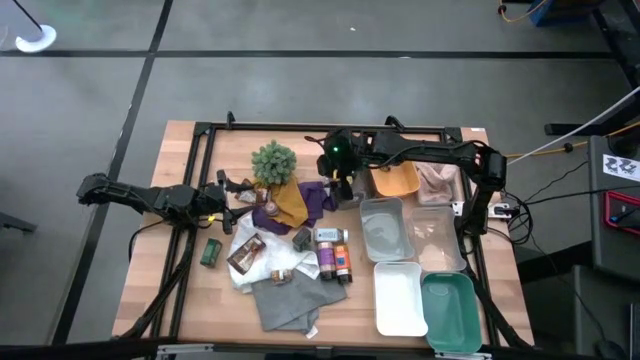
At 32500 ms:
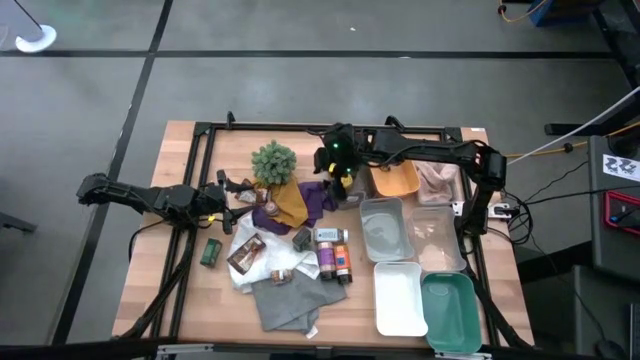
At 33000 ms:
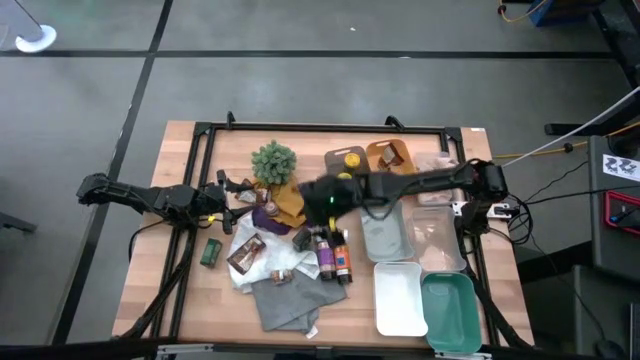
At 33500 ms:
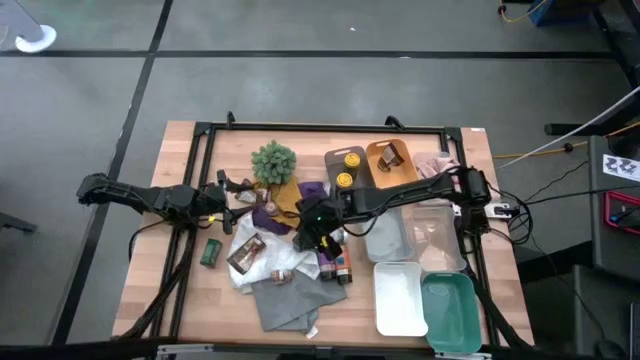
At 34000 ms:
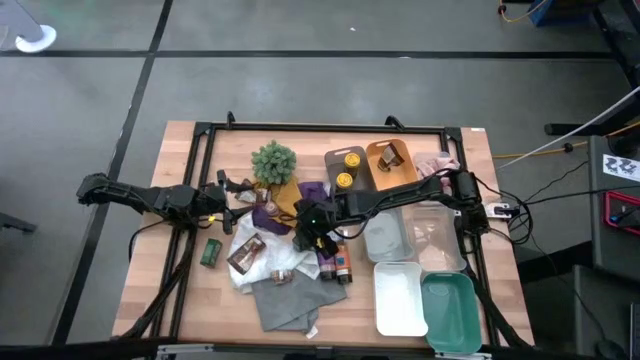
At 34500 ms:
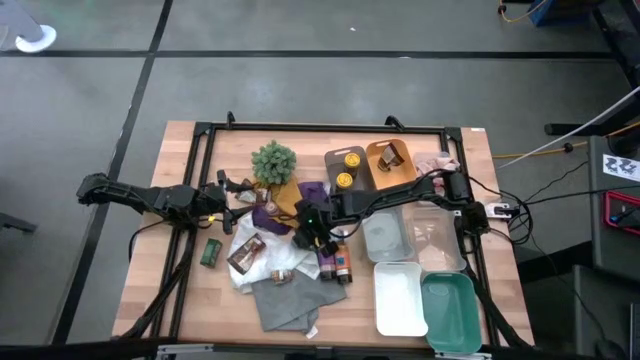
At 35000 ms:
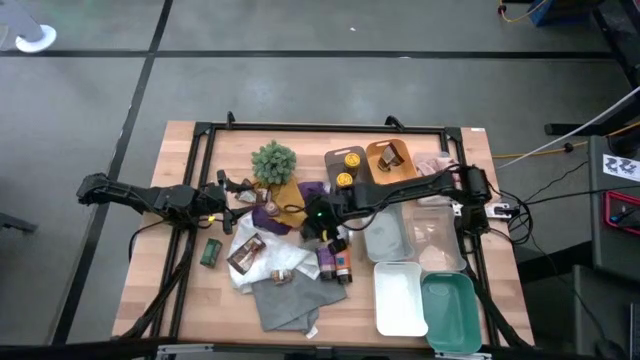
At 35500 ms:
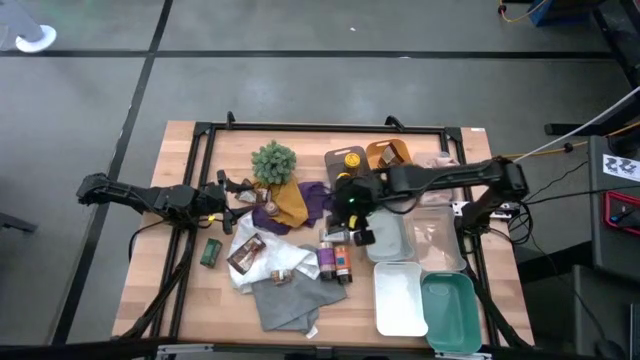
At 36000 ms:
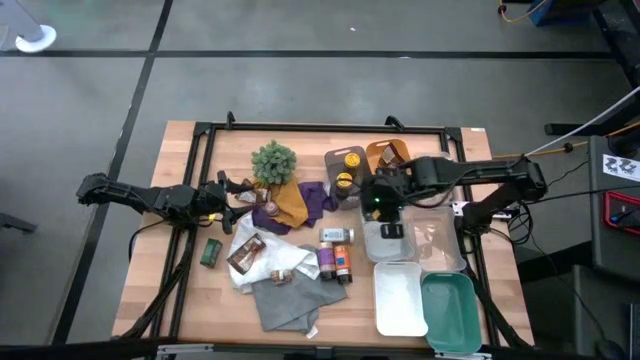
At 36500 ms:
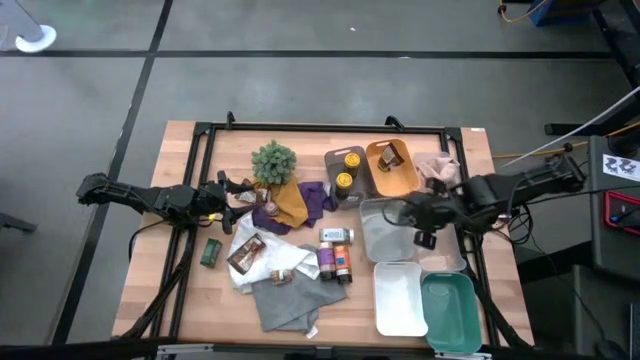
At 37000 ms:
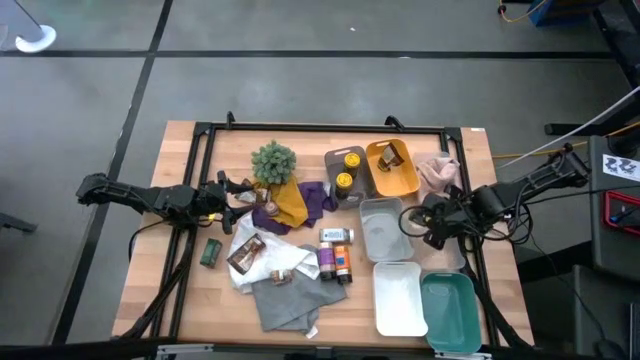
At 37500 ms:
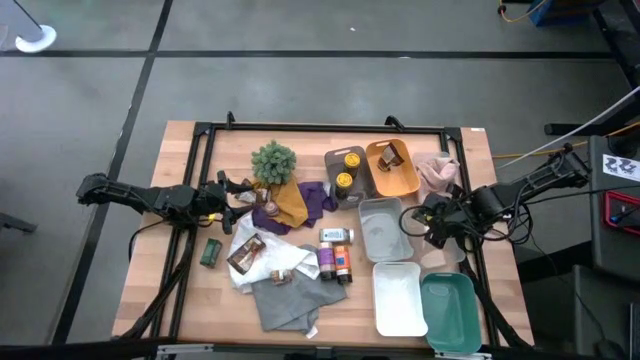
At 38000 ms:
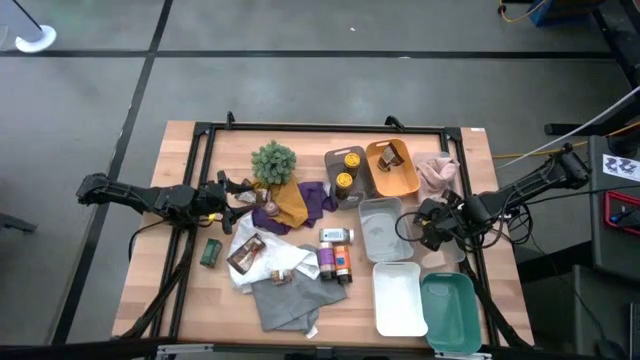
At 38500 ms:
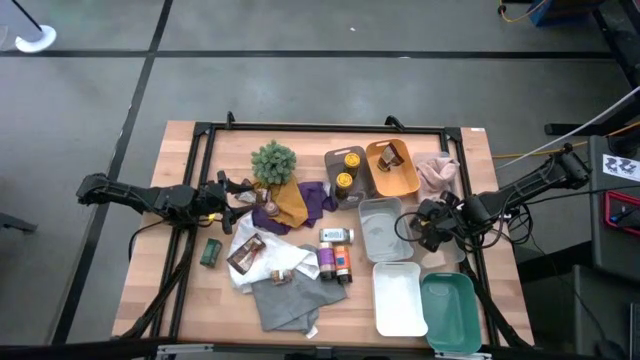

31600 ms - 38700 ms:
Task: Sort spices by type
Put the right black seasoning can into the transparent bin

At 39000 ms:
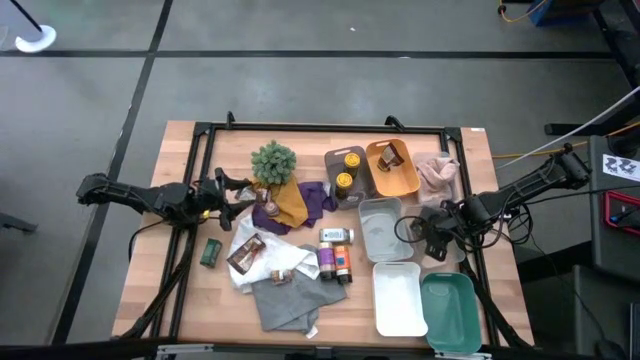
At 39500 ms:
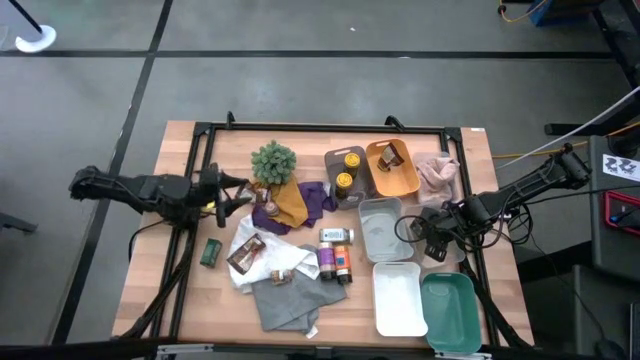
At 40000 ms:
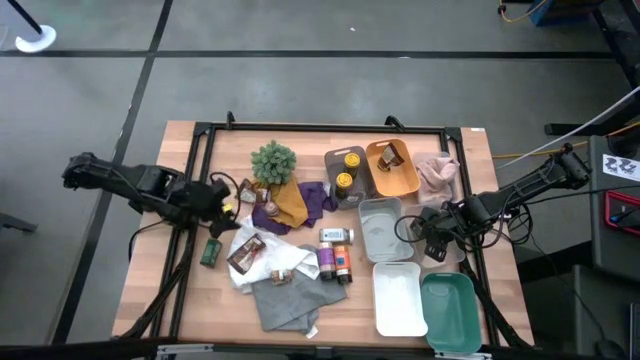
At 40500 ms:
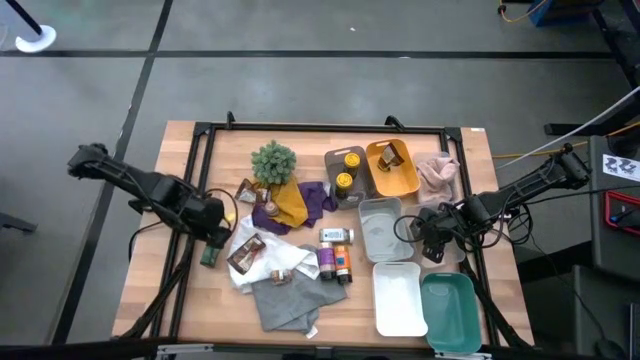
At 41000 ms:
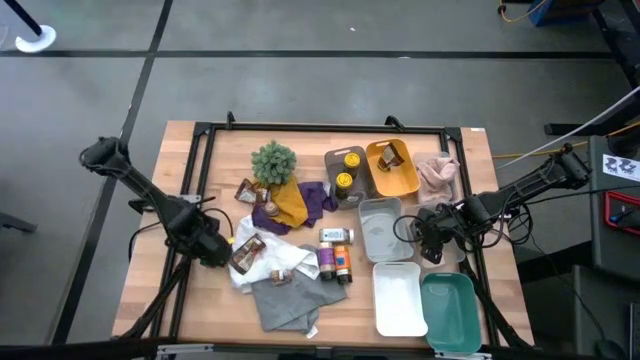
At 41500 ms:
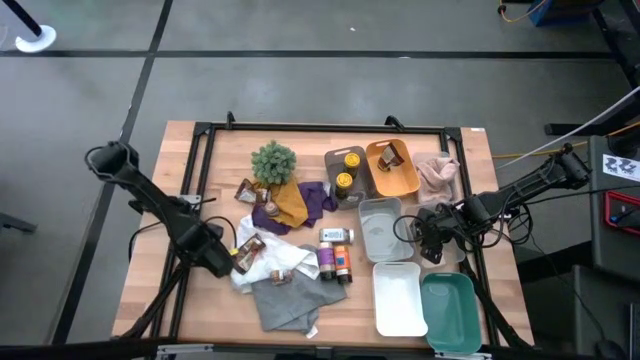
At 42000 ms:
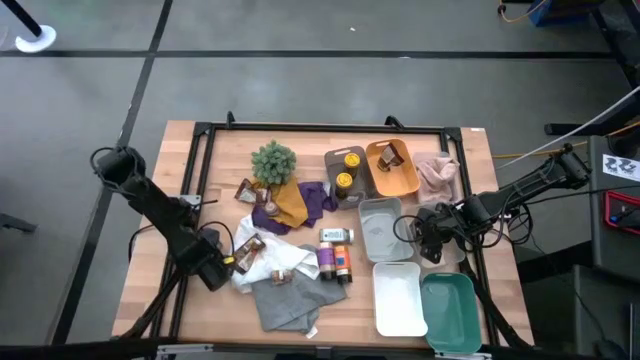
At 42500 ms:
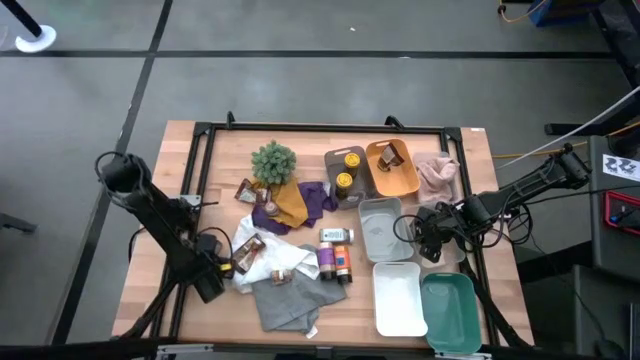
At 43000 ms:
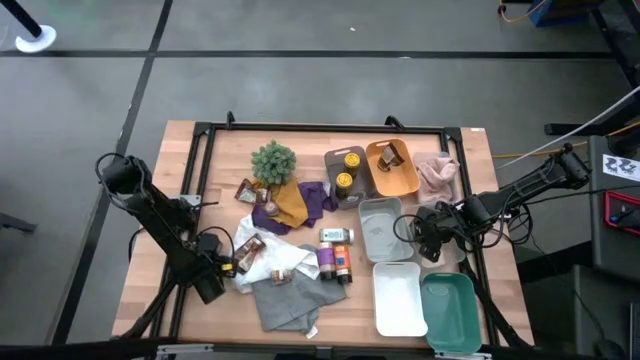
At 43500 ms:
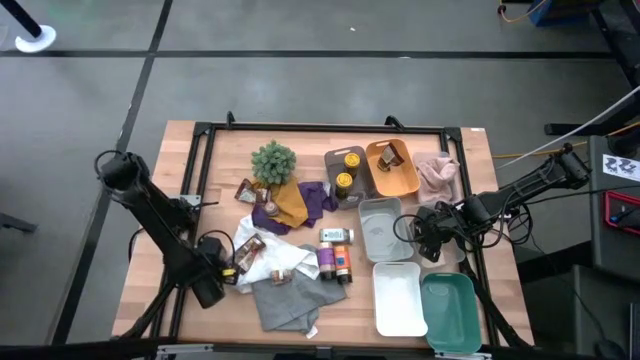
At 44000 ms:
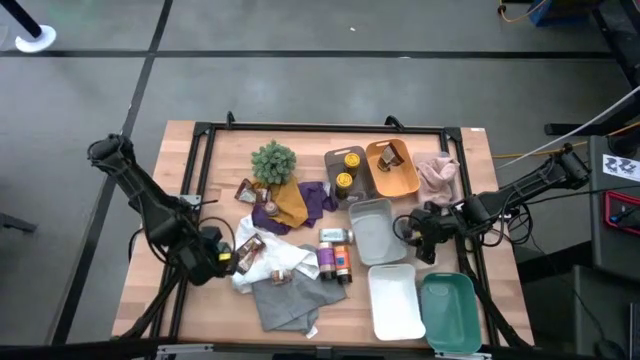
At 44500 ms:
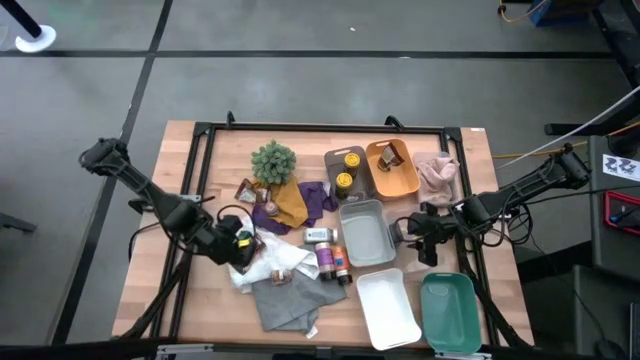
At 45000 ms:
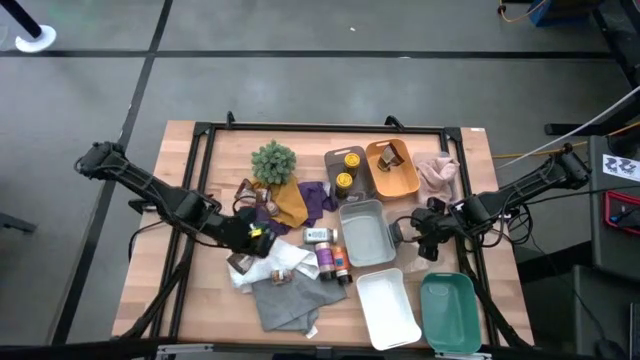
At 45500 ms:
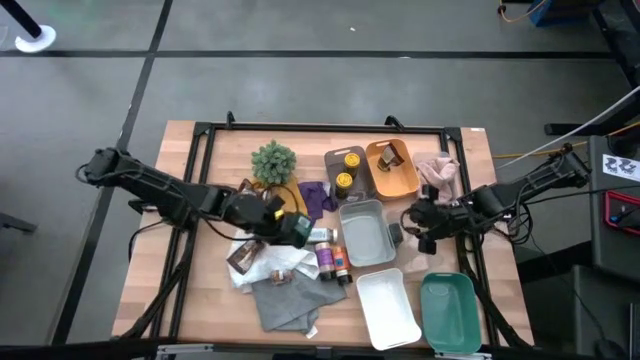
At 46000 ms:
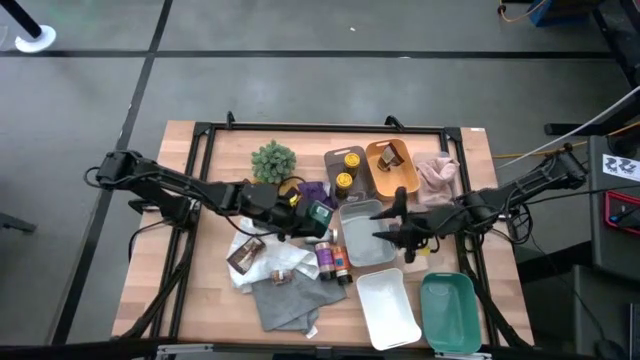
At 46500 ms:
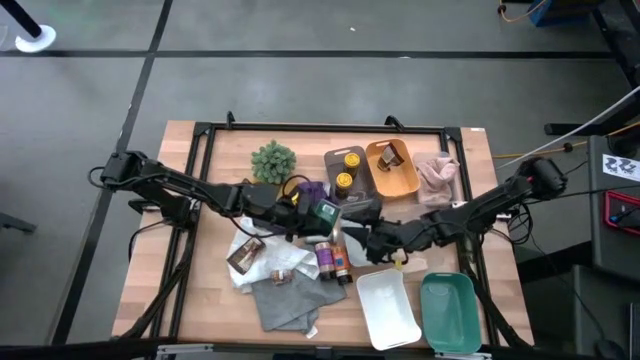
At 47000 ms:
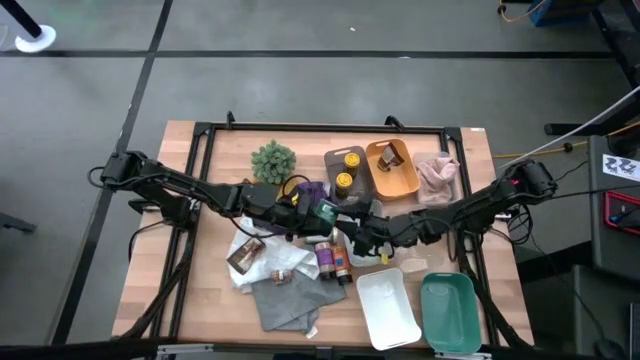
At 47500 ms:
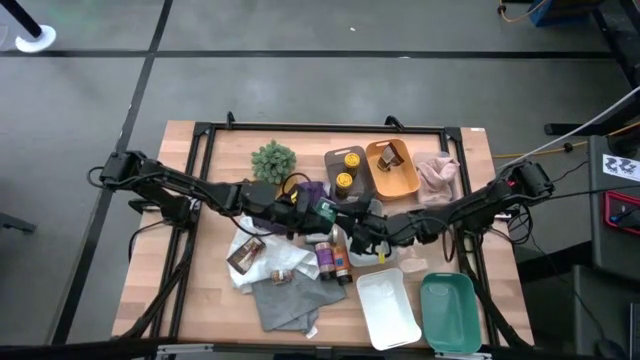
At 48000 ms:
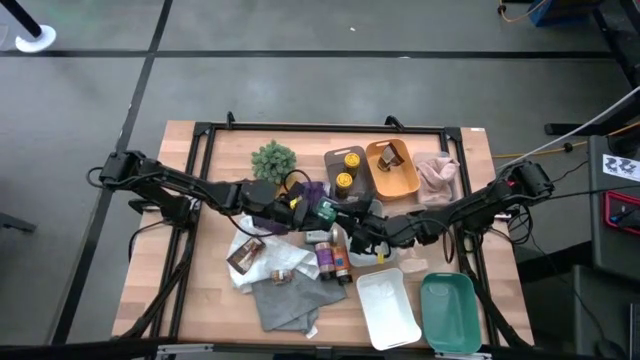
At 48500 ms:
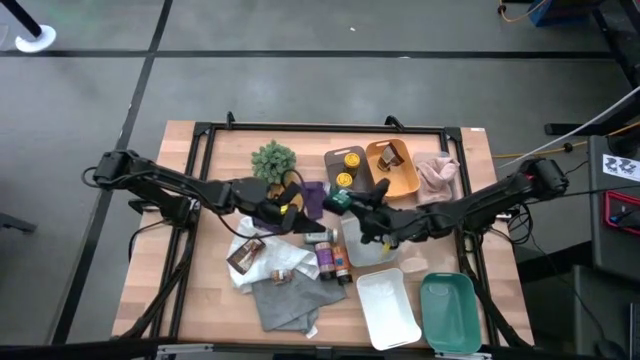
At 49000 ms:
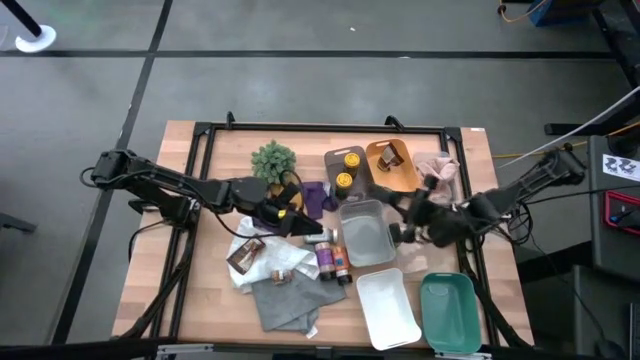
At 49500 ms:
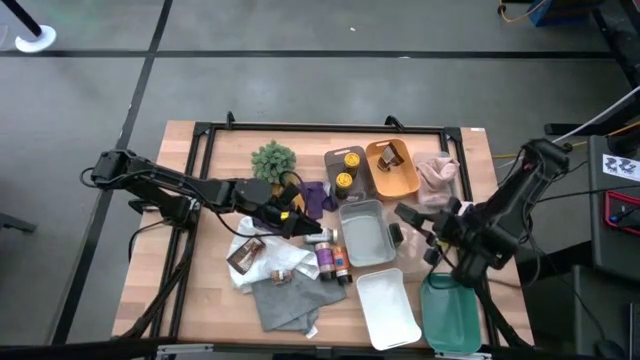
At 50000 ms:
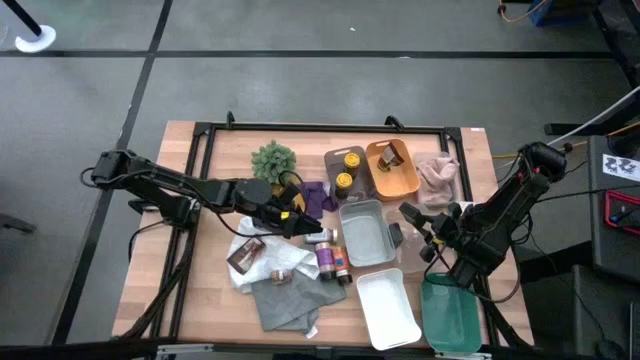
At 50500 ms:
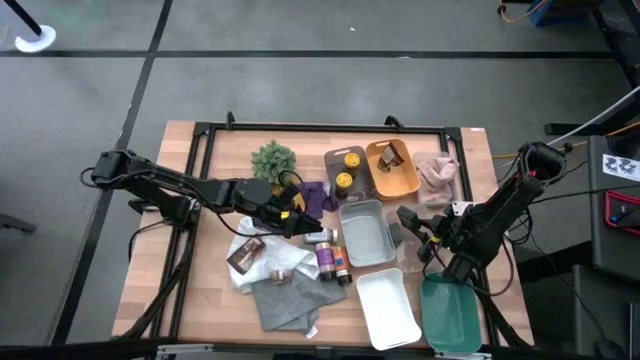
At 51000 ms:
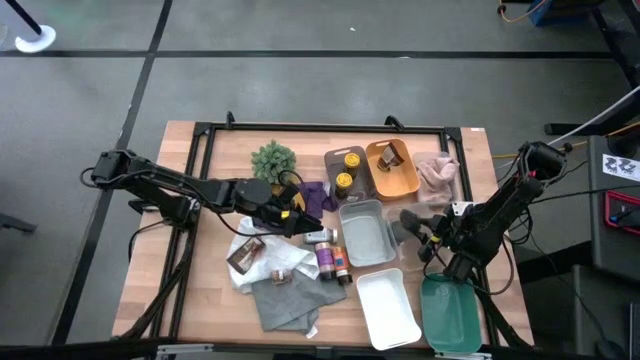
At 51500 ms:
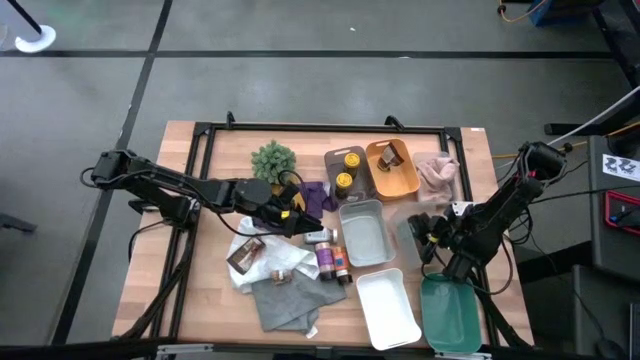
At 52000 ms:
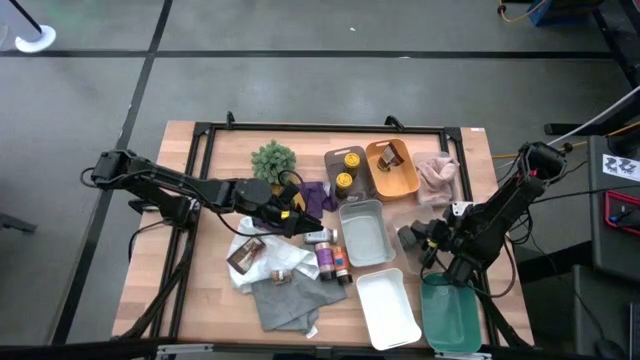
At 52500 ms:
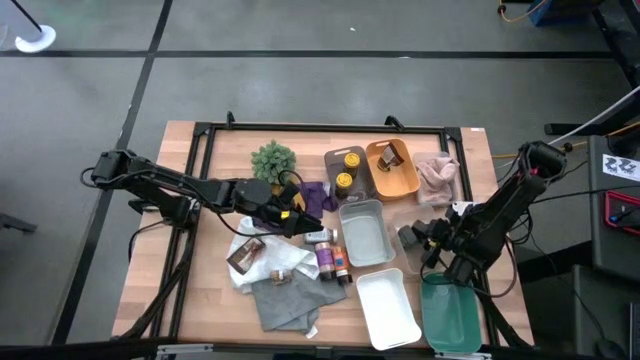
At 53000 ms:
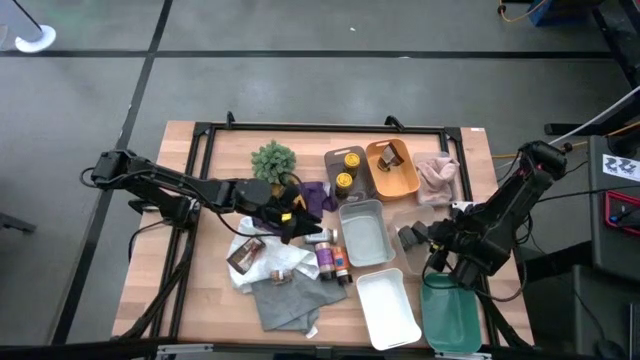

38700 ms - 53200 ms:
Put the black seasoning can into the transparent bin
